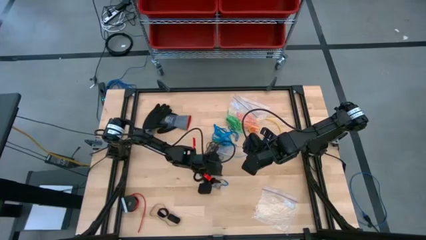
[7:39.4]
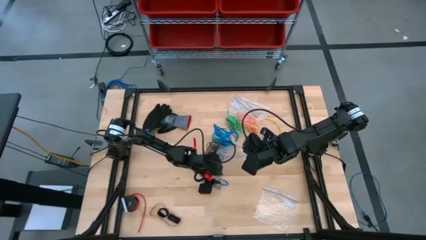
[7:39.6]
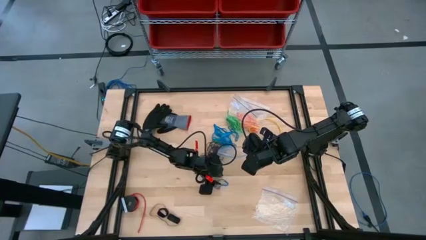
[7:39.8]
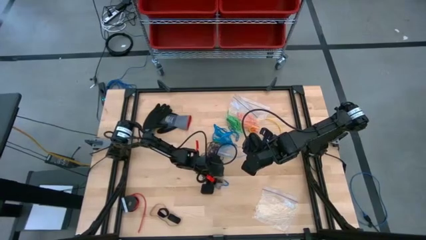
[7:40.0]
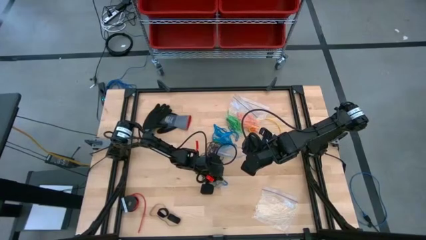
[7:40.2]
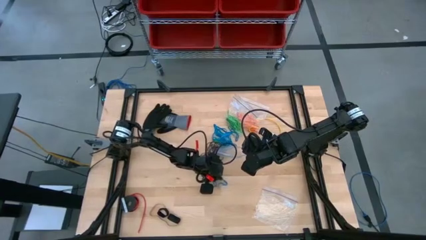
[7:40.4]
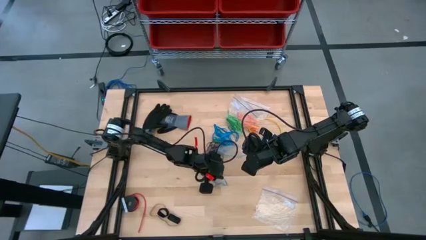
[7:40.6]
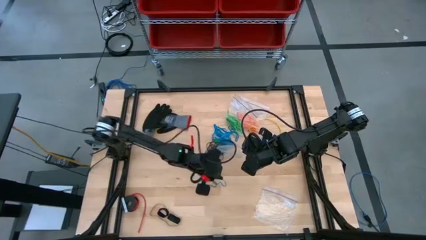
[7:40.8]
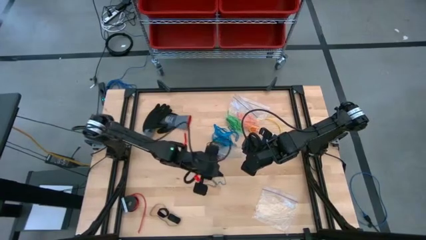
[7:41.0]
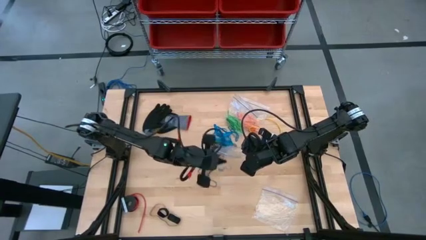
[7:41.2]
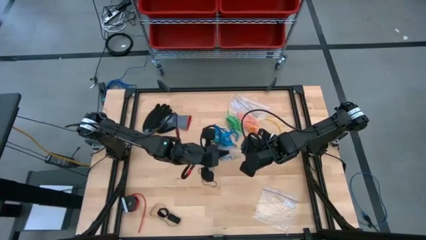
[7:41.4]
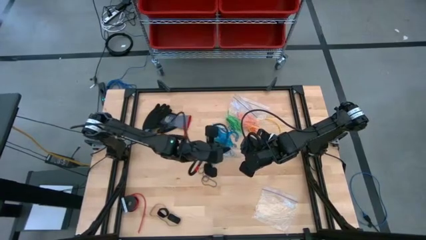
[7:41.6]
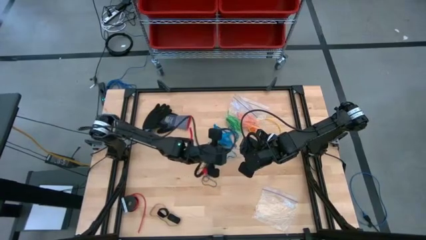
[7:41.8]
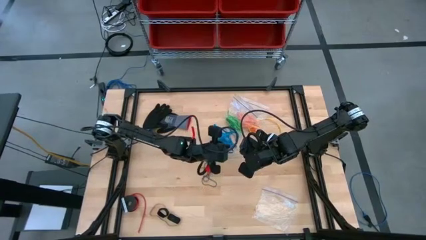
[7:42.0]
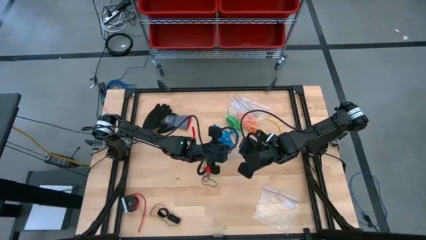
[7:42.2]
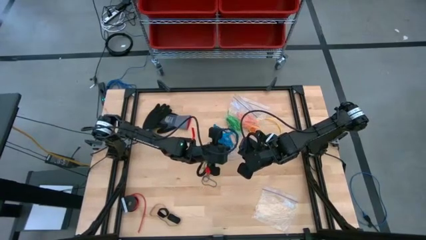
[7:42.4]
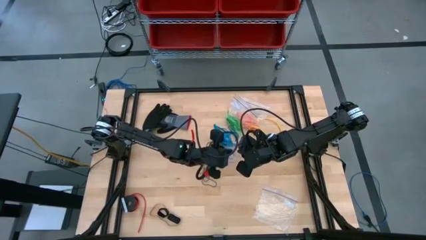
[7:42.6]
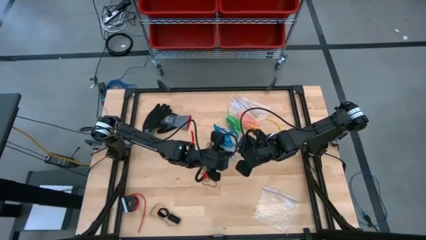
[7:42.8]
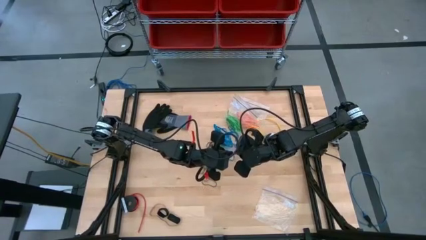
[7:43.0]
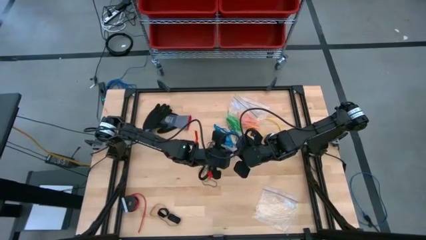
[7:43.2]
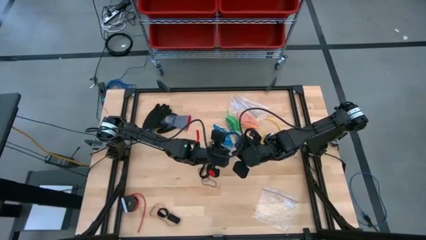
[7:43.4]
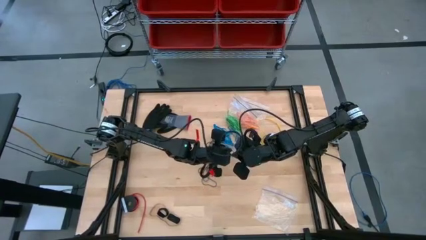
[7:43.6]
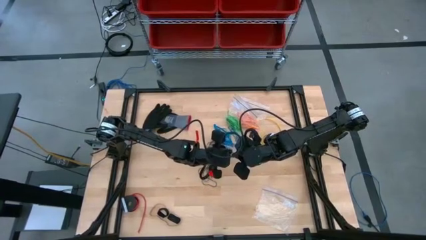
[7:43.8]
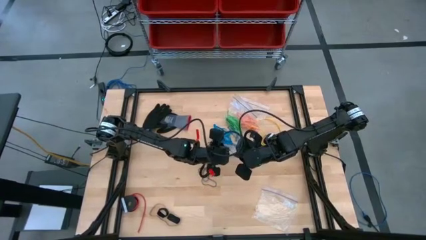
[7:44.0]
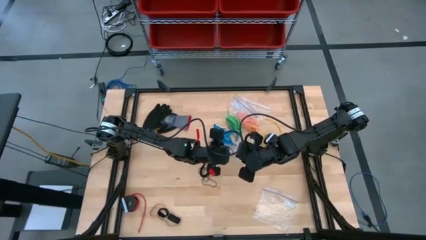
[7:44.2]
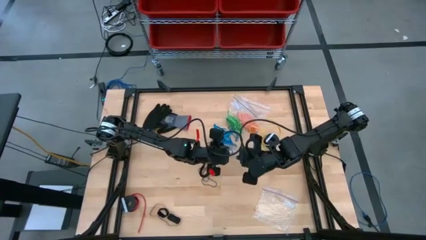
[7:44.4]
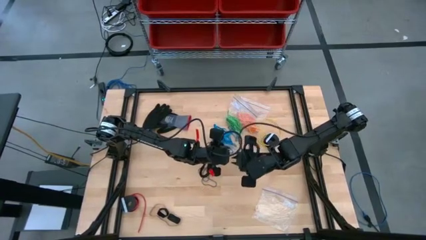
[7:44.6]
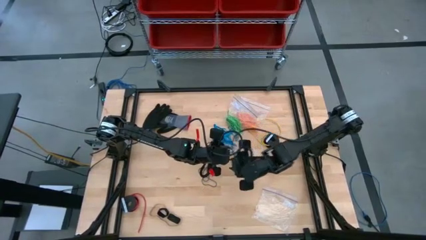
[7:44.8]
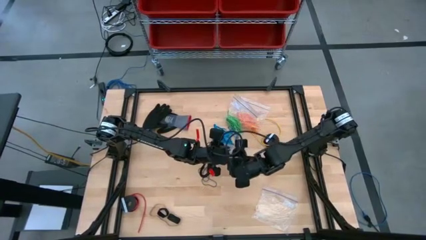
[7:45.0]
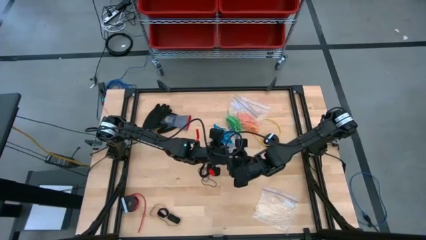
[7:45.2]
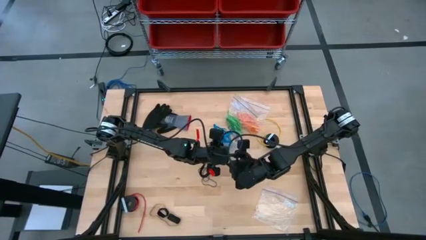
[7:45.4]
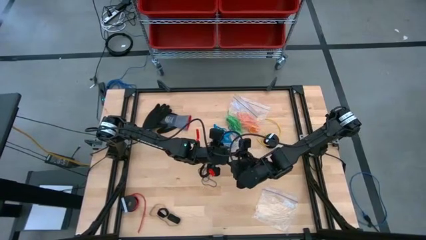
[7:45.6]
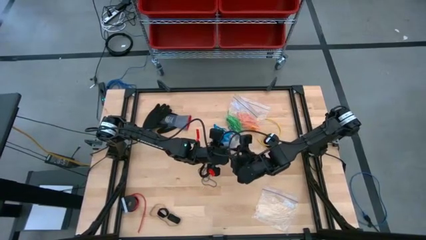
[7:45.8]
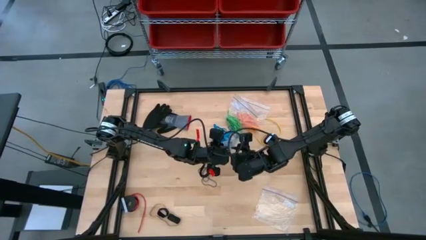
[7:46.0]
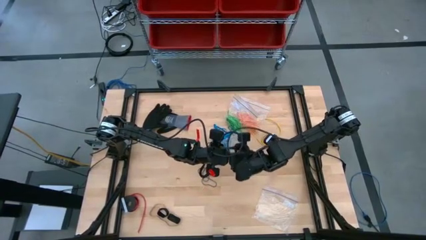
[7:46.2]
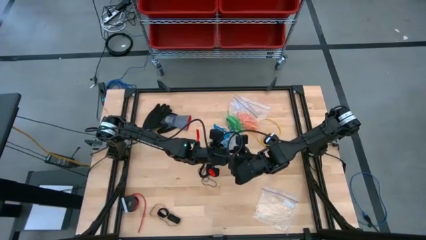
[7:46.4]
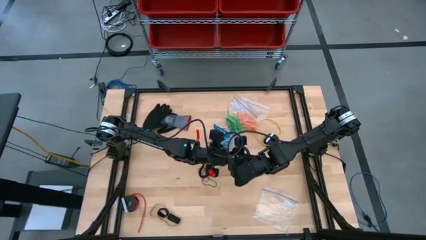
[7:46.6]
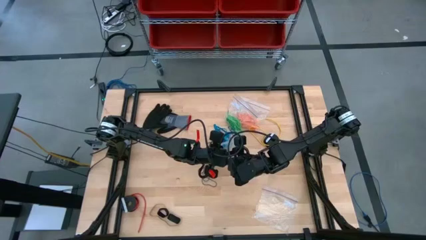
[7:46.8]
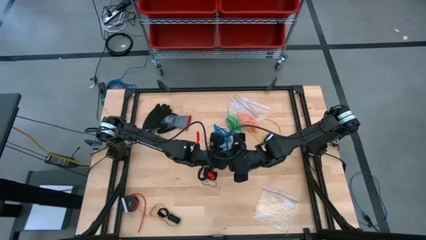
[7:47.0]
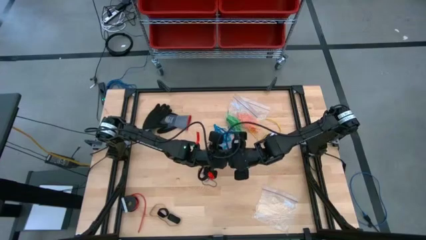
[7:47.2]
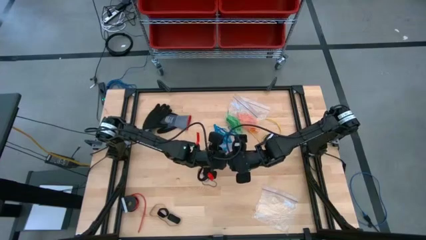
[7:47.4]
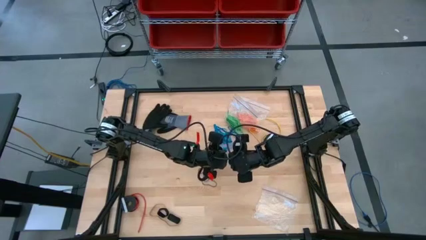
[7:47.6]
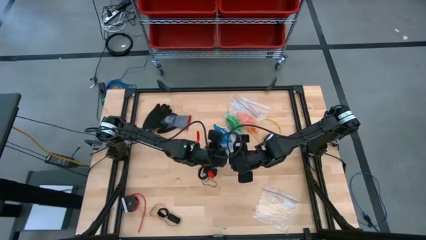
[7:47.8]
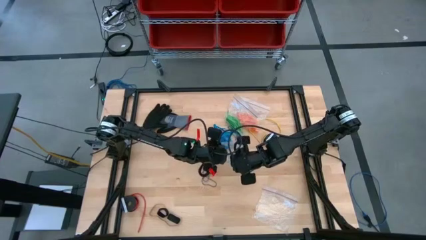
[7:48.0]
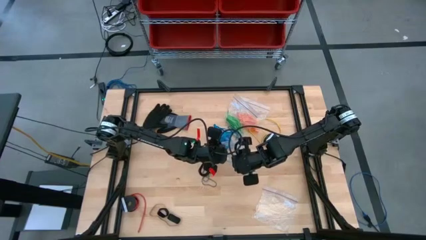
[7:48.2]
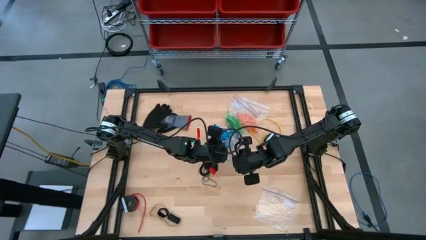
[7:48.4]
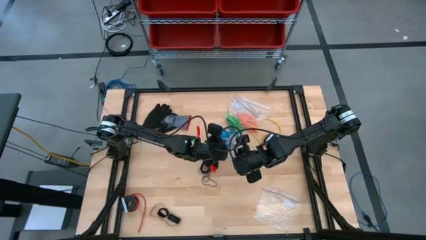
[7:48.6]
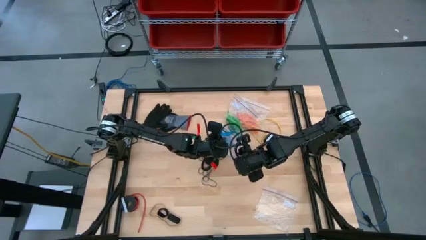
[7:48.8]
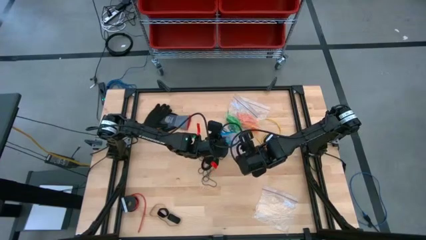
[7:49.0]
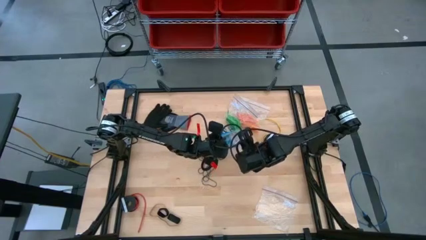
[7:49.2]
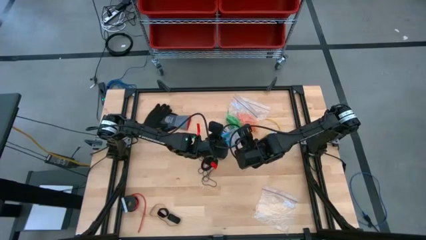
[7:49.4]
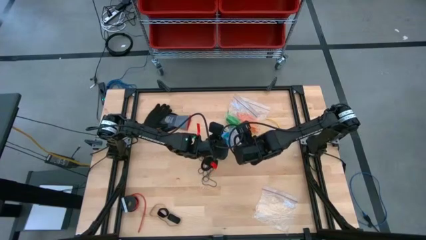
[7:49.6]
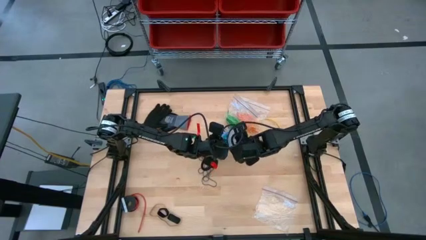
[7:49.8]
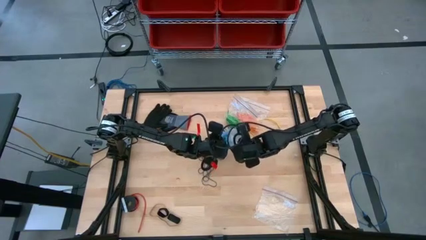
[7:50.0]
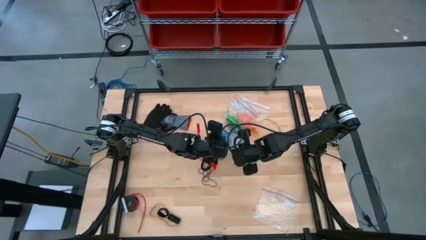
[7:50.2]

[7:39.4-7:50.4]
Task: Sort rubber bands
Put the blue rubber band into the transparent zip bag

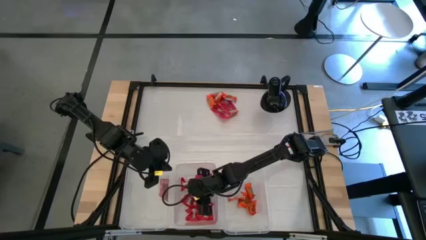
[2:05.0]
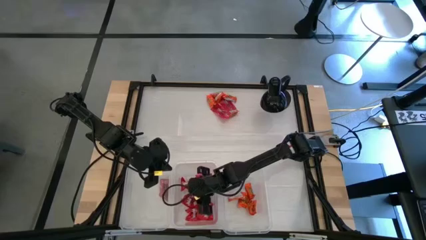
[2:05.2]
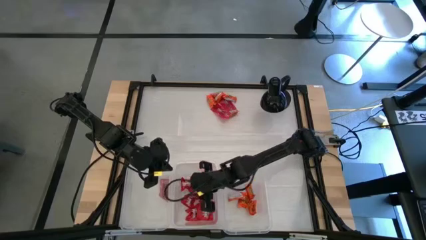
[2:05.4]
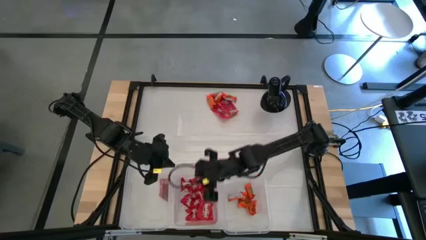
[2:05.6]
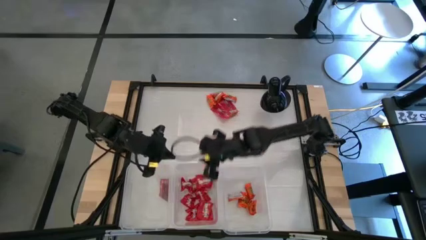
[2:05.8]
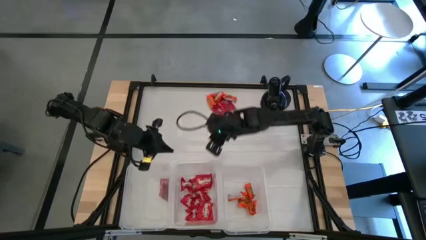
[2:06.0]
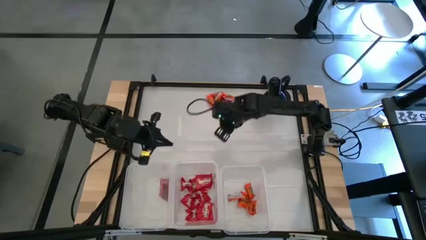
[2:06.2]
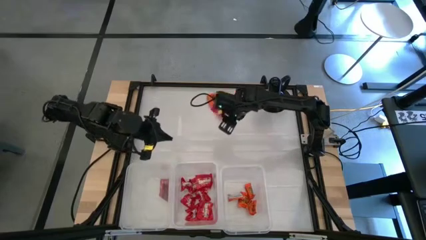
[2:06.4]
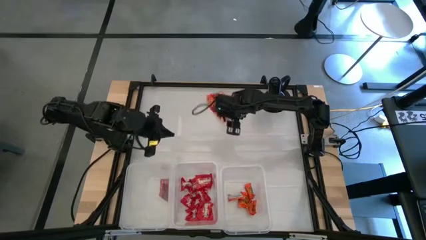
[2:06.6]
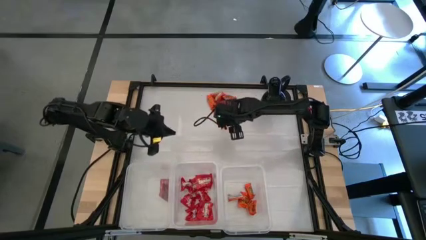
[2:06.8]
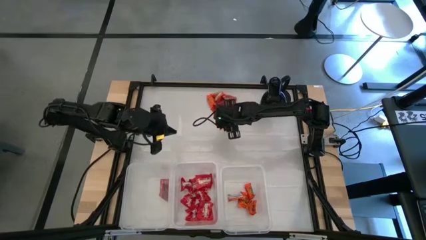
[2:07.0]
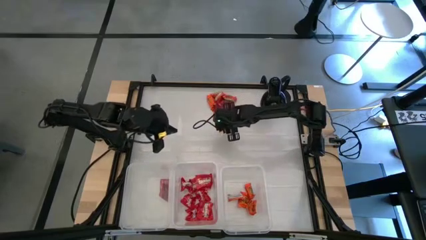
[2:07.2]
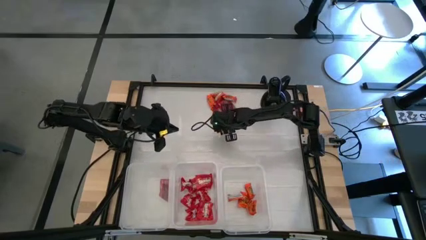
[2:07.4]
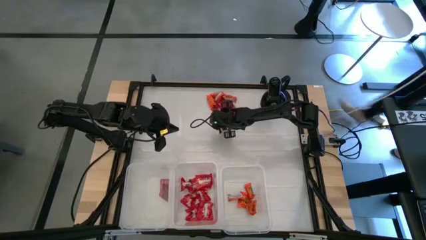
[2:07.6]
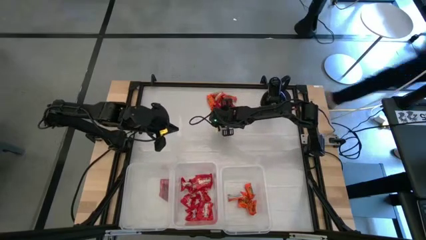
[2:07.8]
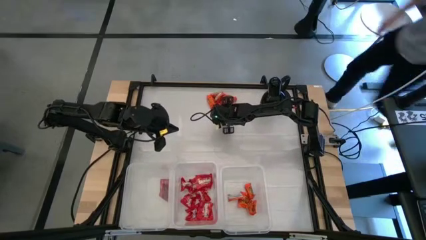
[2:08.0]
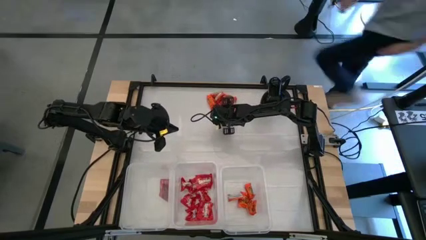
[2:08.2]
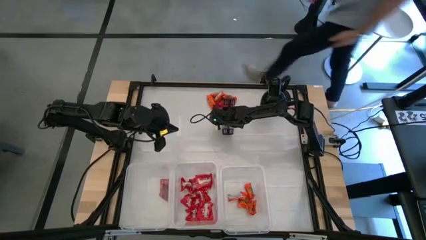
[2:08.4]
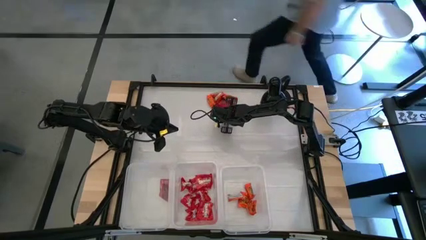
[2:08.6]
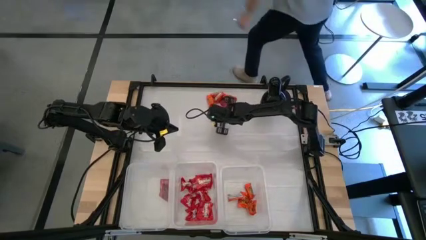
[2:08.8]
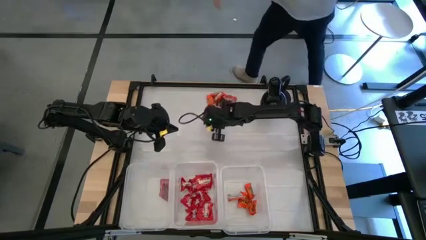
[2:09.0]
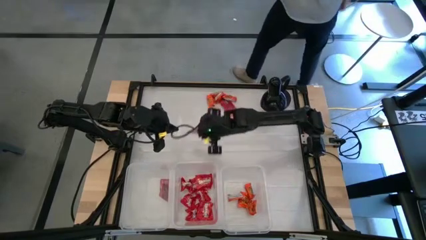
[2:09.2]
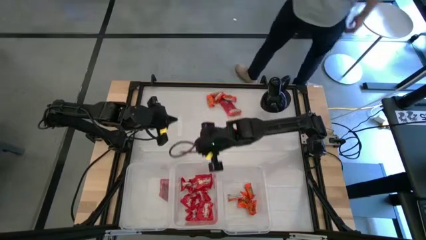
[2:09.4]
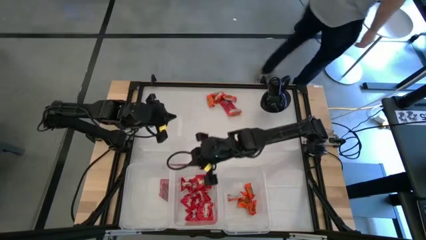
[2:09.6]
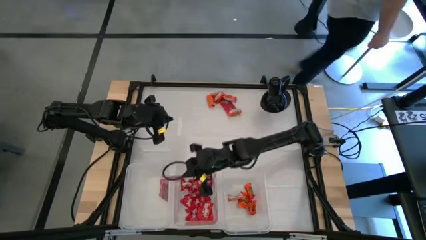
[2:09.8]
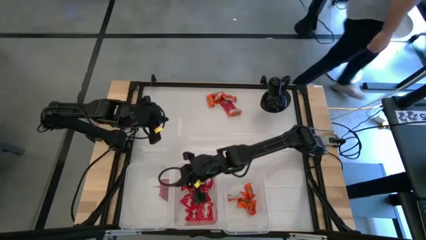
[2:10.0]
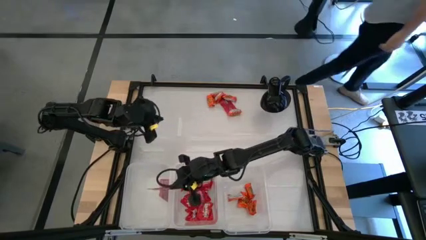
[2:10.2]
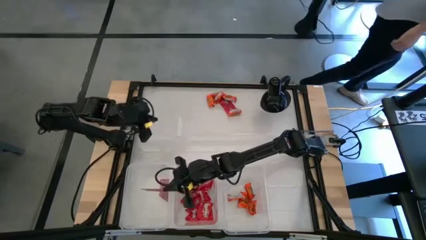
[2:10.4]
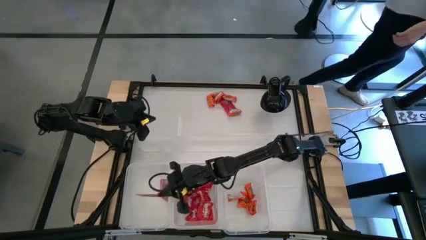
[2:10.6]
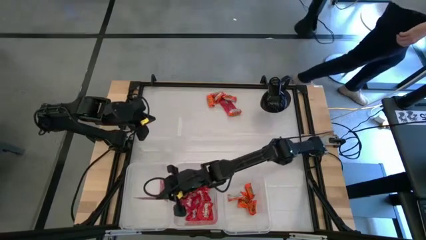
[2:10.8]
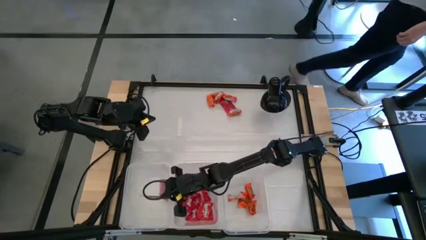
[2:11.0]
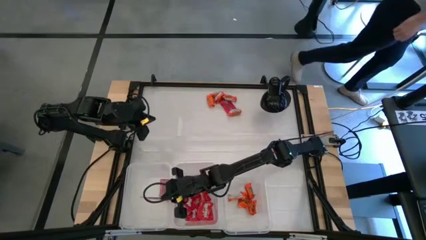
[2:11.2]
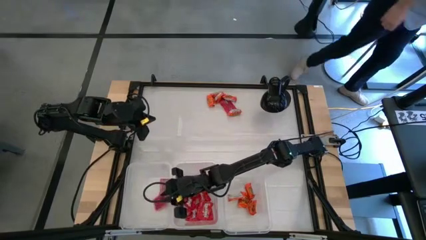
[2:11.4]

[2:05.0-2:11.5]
Task: Sort candy
Put the light red candy into the left transparent bin
